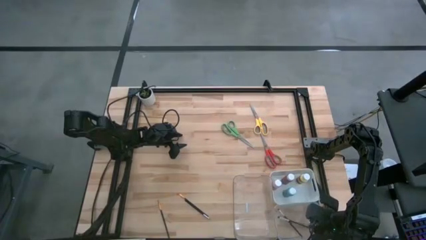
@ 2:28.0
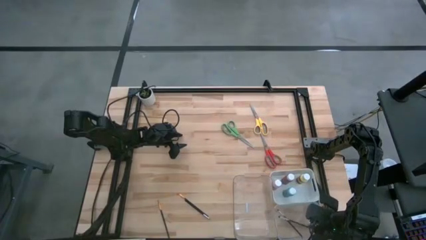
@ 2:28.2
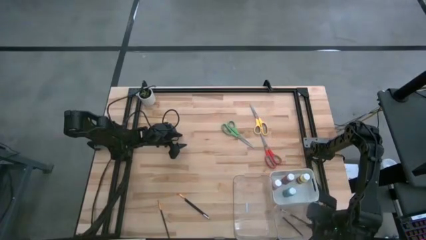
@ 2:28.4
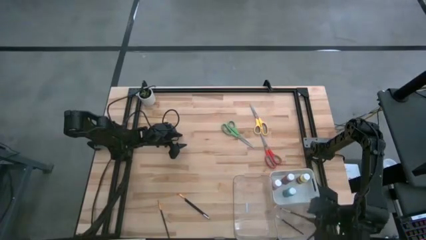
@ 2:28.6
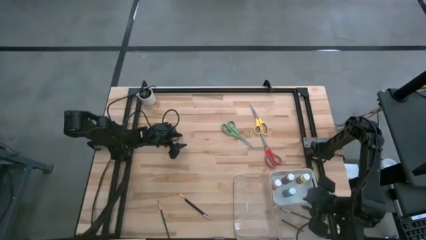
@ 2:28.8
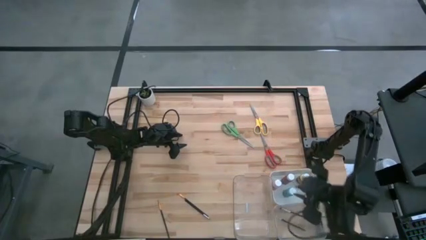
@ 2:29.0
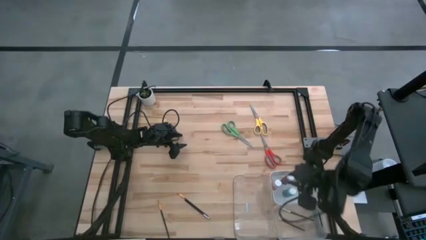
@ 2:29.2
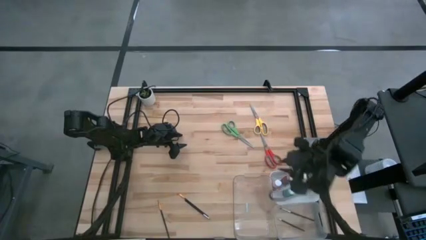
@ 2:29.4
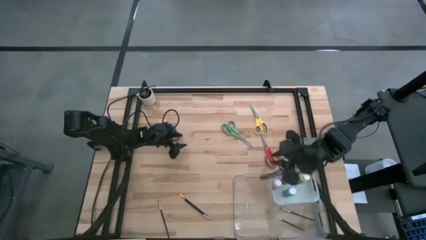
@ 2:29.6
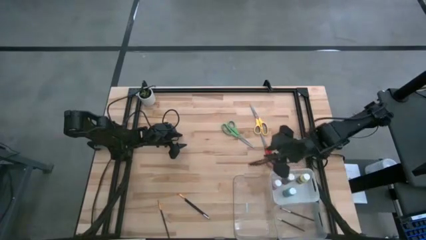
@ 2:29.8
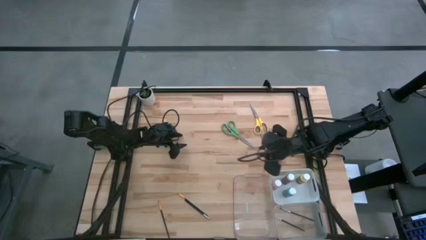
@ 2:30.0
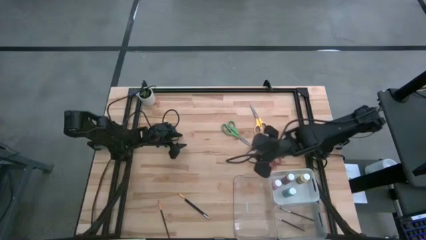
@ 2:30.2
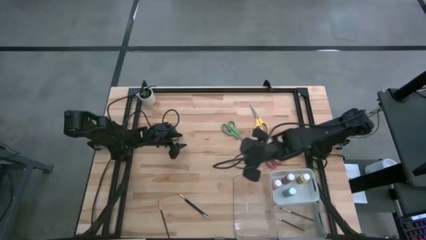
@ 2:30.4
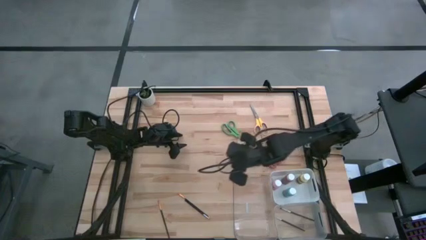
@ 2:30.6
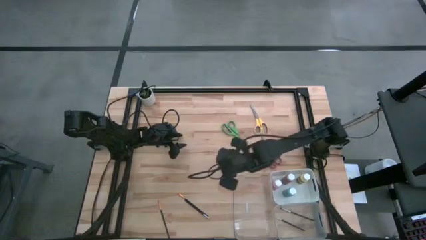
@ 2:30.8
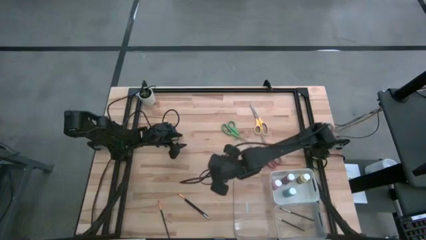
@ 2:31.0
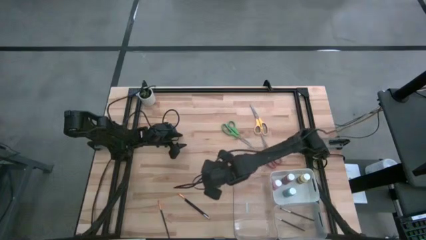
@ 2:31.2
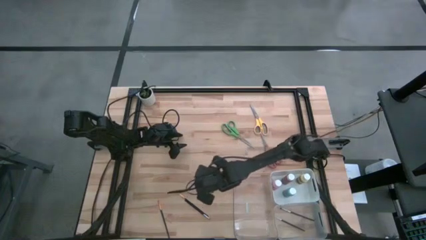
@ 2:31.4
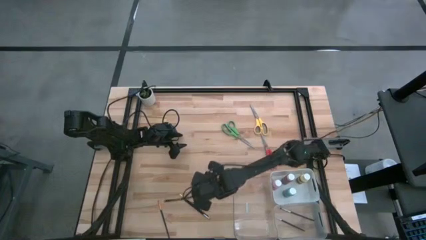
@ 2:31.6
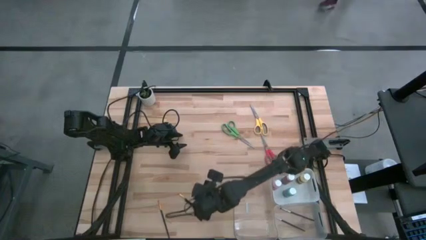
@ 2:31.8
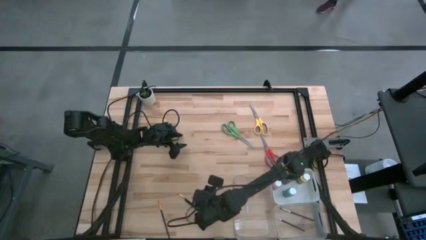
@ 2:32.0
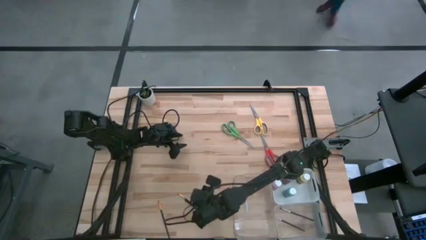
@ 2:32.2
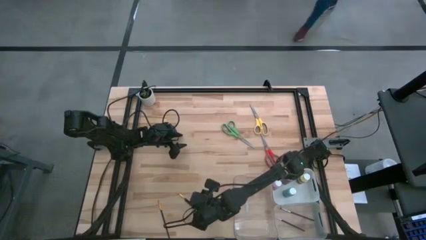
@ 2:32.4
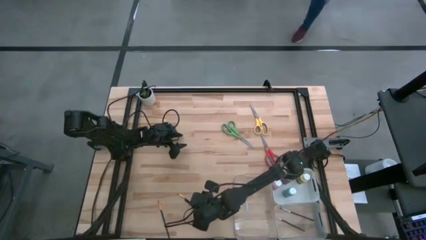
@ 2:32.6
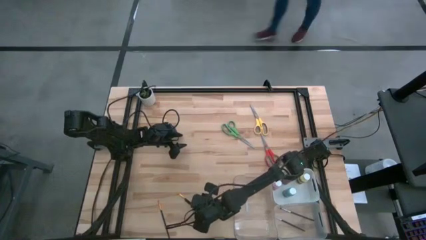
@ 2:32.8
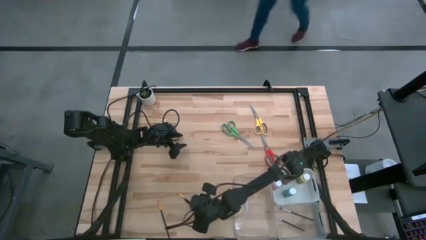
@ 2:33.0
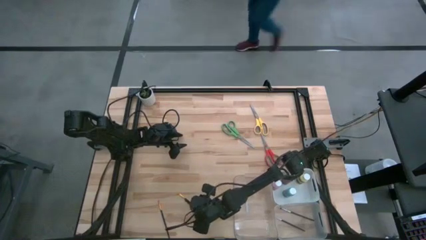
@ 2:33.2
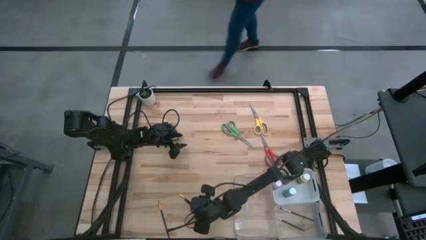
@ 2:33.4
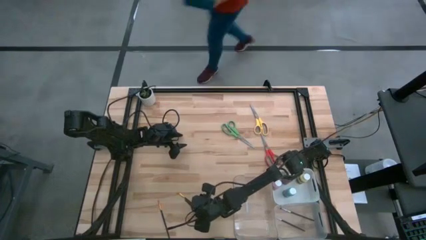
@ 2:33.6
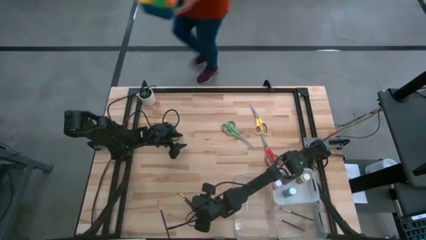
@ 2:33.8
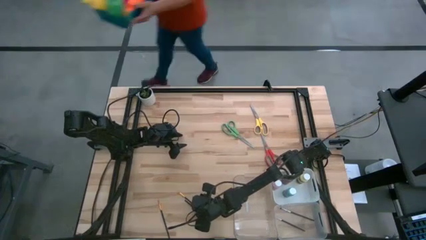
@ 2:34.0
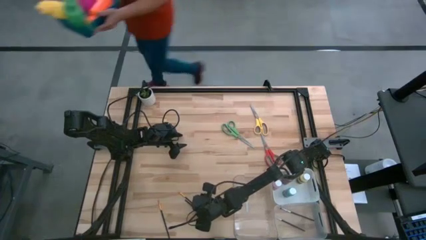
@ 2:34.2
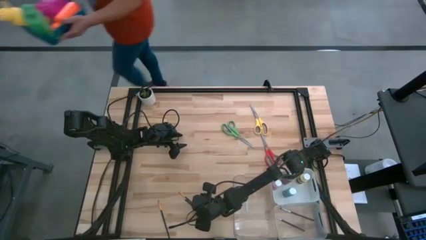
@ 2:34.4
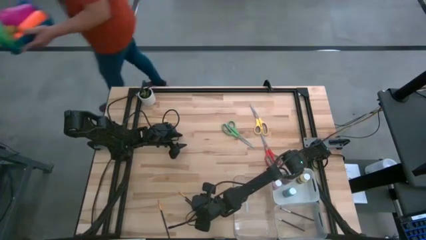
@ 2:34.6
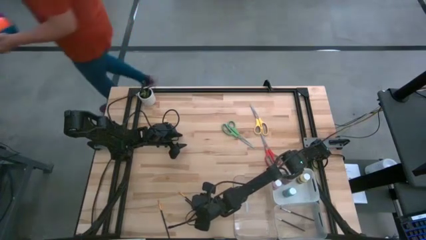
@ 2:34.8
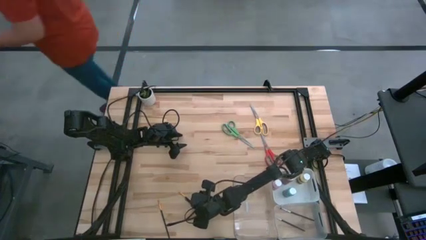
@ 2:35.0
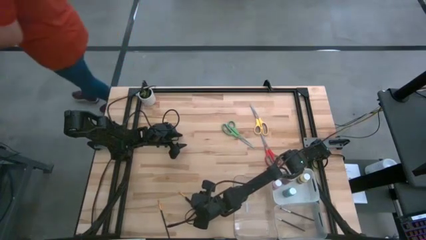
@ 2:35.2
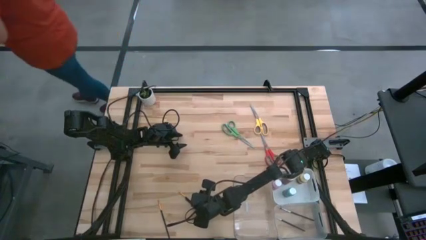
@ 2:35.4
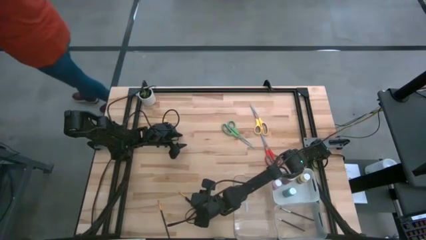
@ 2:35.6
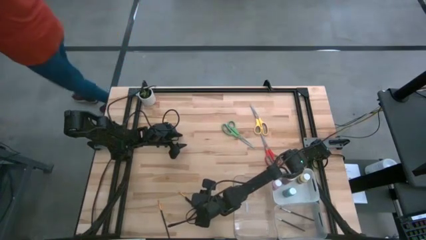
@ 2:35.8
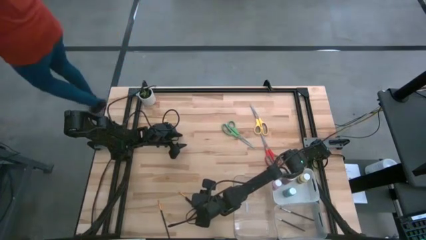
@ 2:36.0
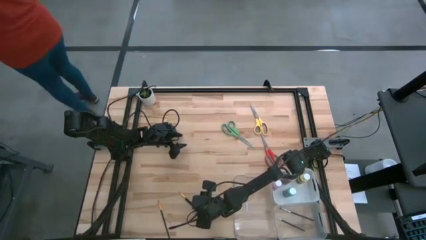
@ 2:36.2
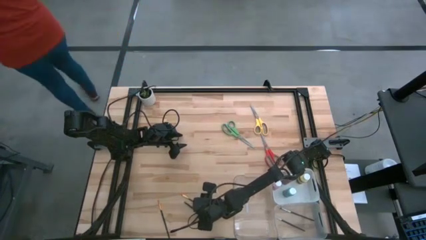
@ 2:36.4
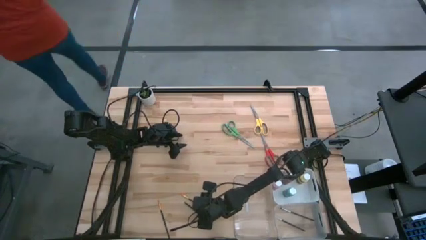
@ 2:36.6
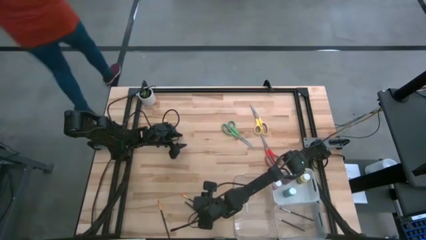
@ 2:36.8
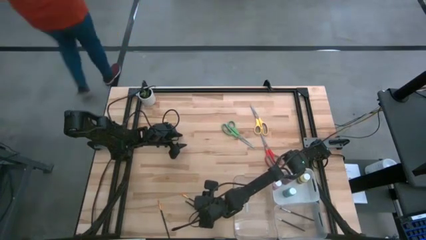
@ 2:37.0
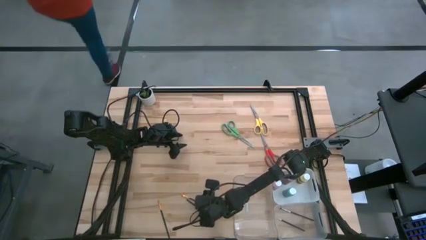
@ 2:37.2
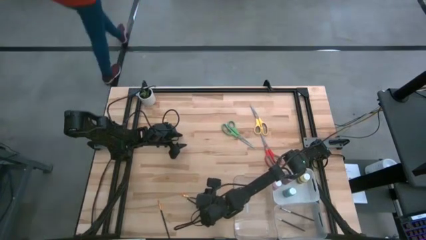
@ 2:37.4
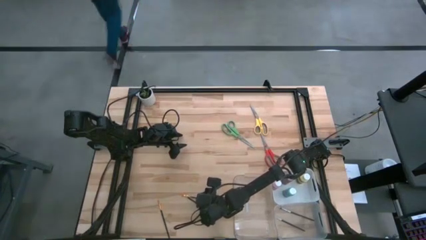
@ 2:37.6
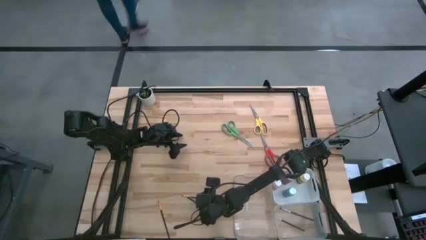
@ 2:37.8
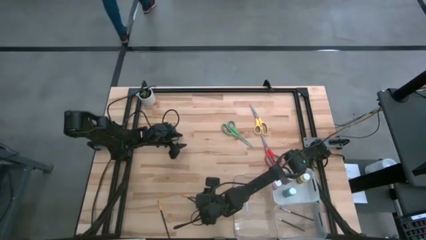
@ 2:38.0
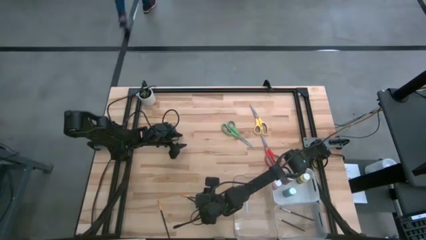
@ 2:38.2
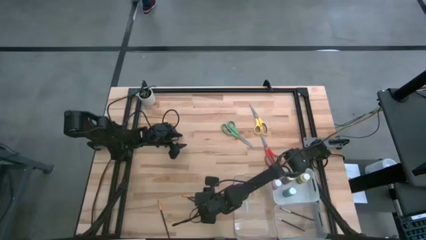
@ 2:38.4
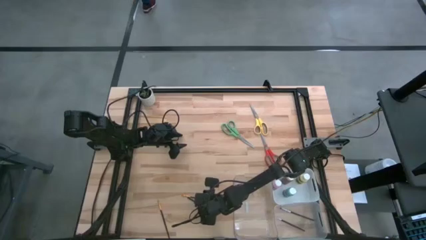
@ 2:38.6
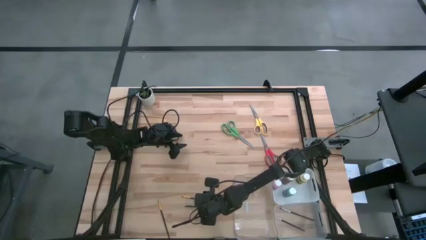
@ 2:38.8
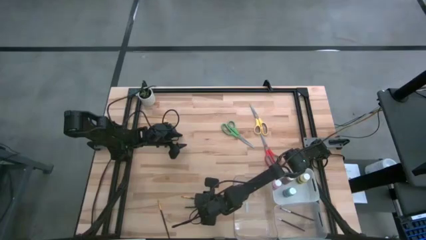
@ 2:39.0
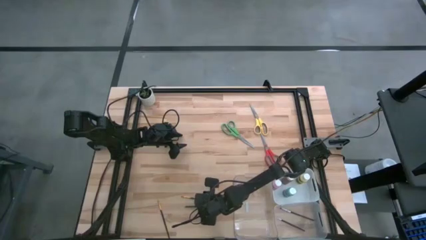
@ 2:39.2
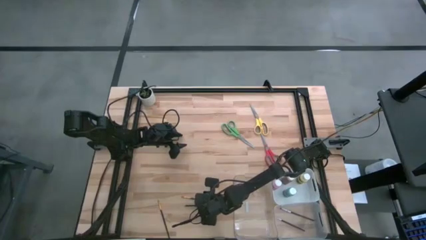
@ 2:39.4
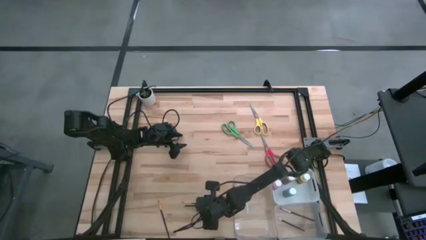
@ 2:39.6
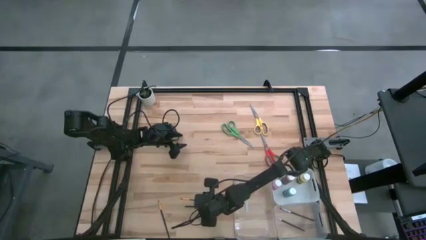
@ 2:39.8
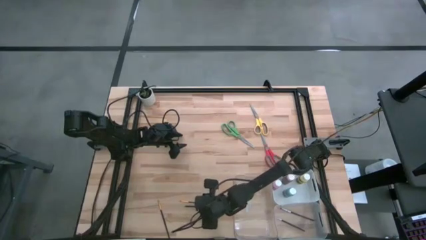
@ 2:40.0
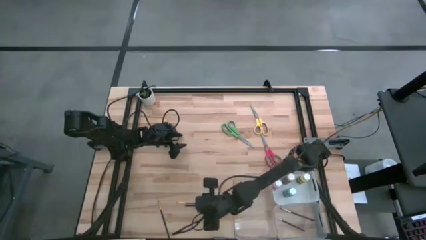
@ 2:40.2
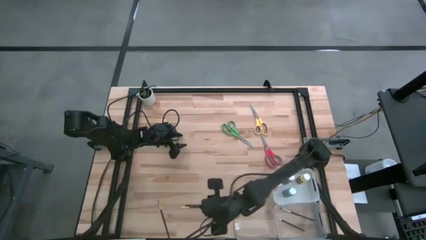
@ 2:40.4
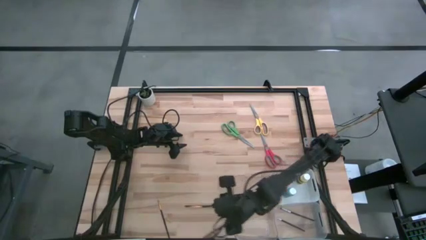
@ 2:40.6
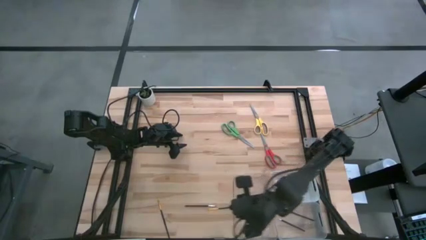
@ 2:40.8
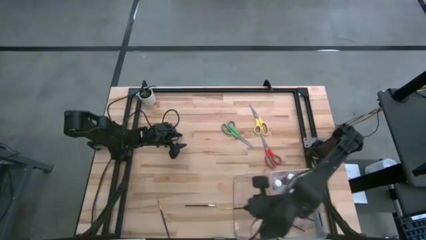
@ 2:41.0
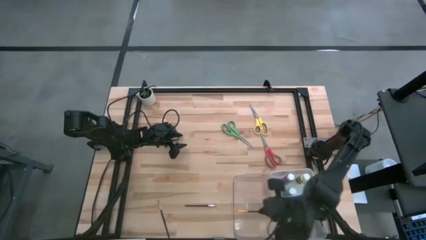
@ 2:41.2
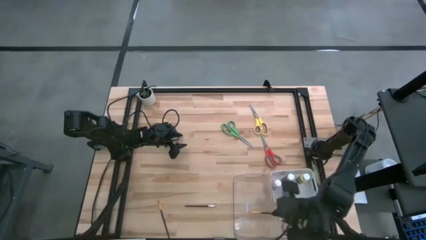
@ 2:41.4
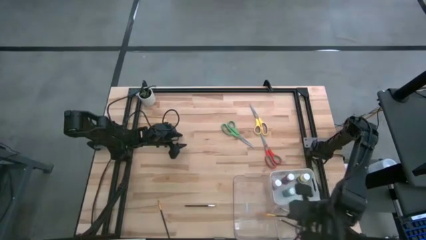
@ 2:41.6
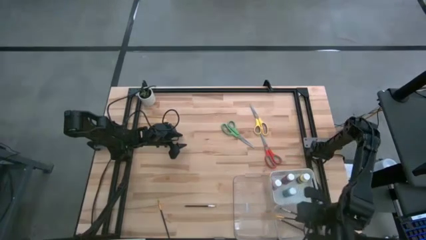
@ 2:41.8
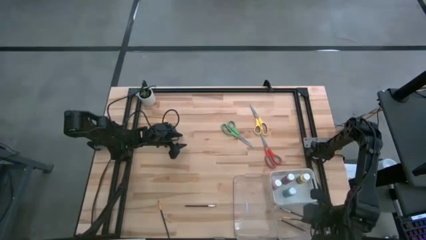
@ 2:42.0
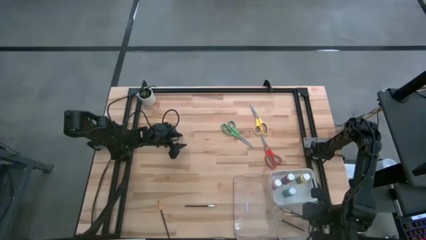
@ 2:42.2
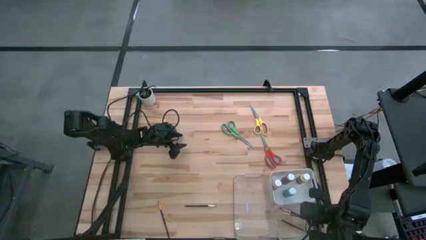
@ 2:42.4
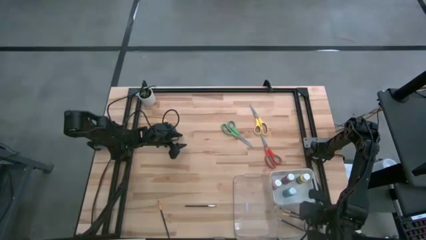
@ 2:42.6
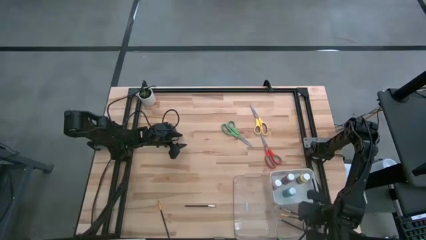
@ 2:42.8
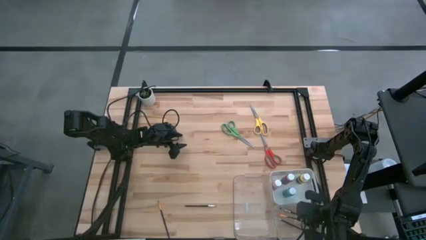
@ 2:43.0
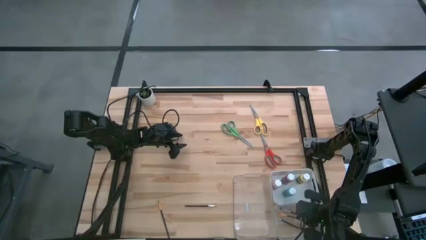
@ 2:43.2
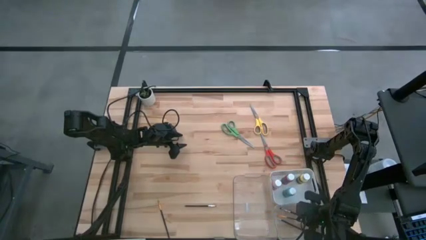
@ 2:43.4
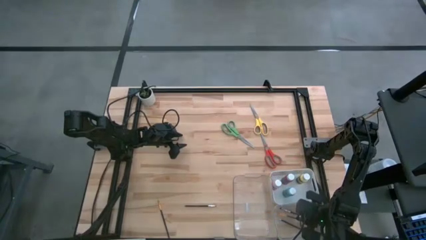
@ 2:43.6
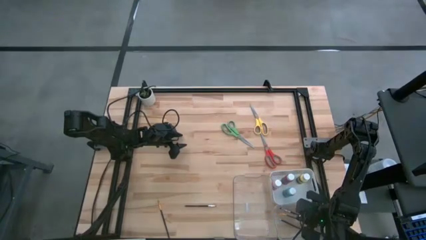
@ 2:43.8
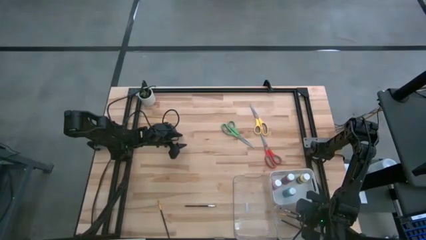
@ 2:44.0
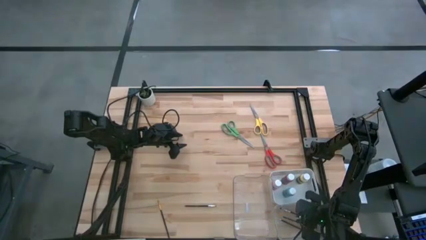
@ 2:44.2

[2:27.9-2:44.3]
Task: Pick & Place Paint Supplies
Put the right gold paintbrush into the right transparent bin
